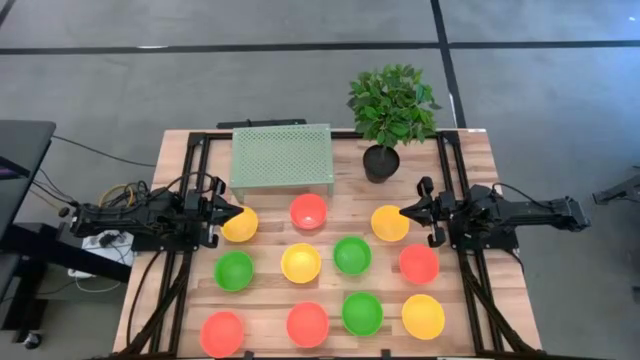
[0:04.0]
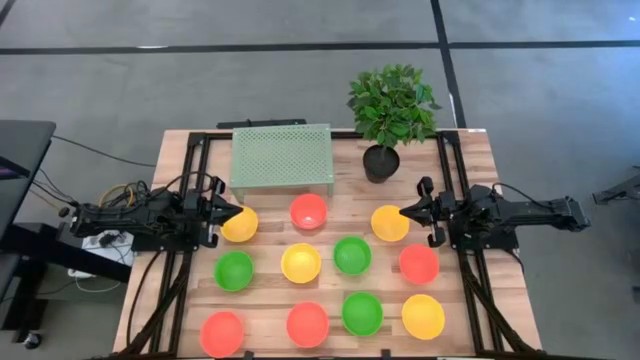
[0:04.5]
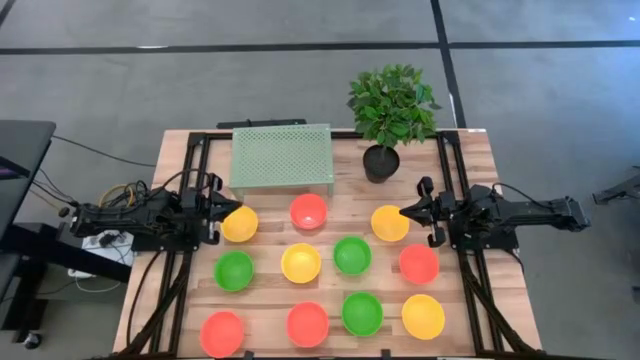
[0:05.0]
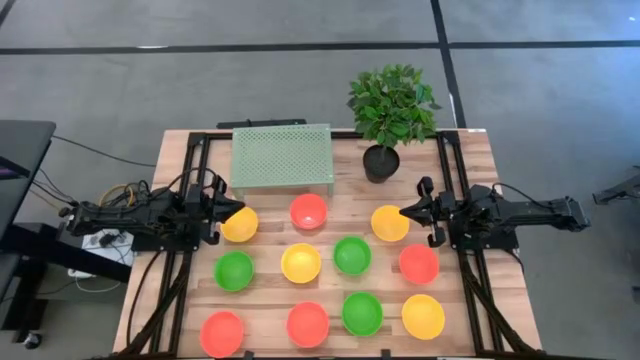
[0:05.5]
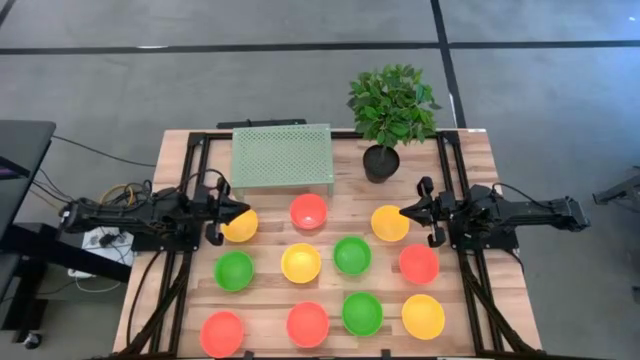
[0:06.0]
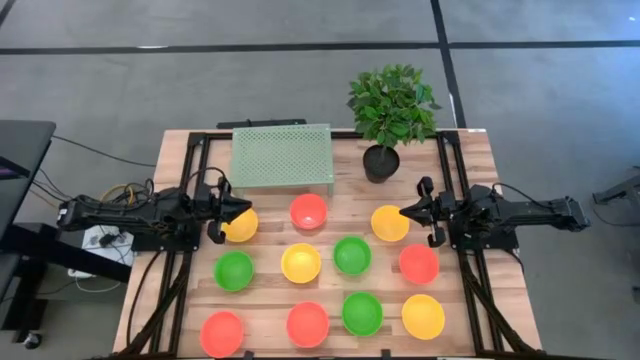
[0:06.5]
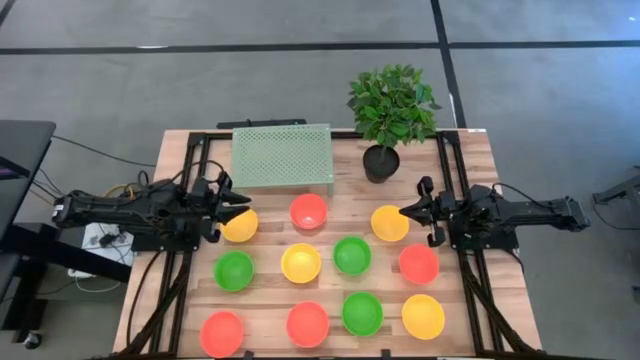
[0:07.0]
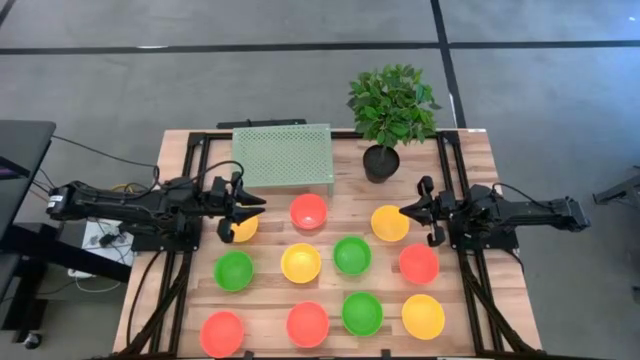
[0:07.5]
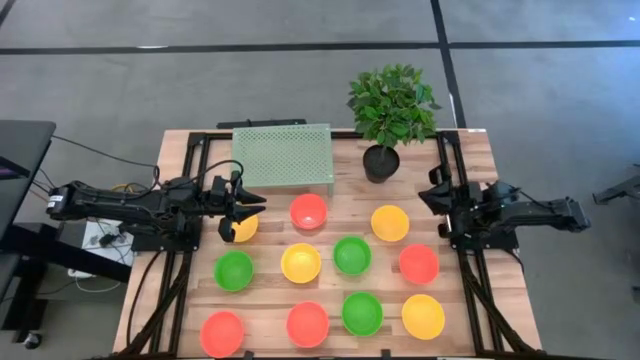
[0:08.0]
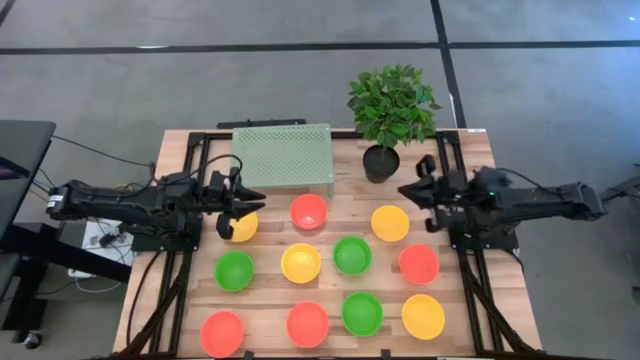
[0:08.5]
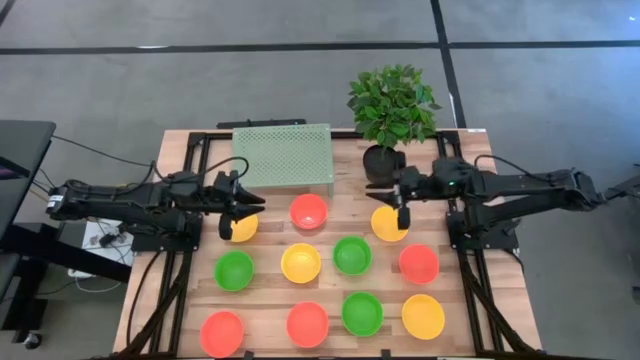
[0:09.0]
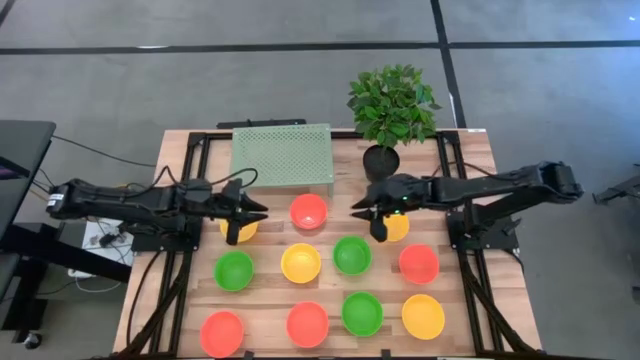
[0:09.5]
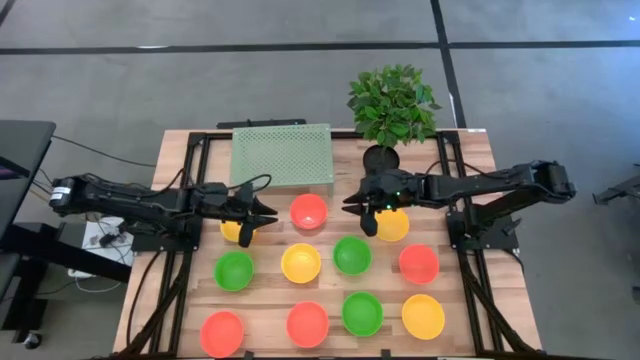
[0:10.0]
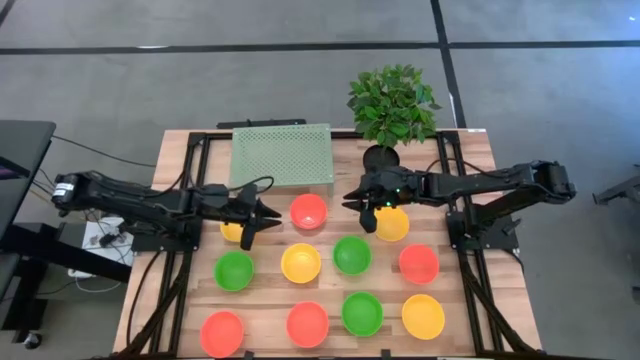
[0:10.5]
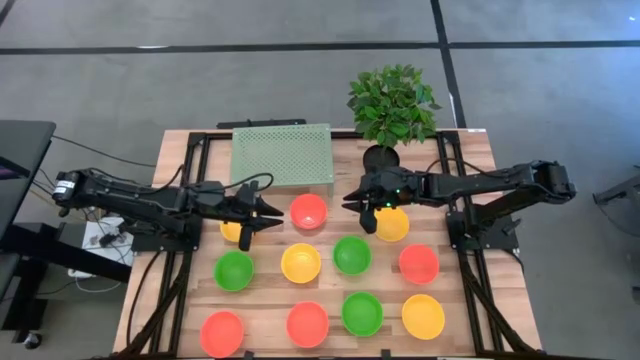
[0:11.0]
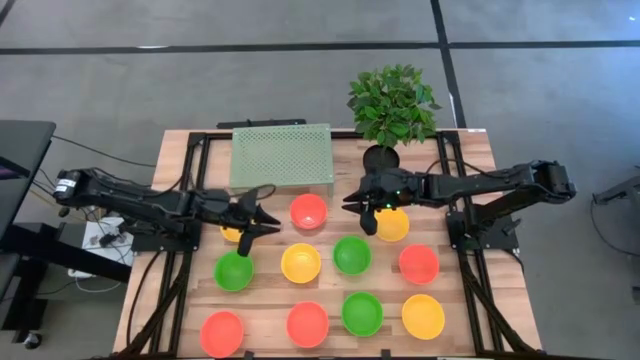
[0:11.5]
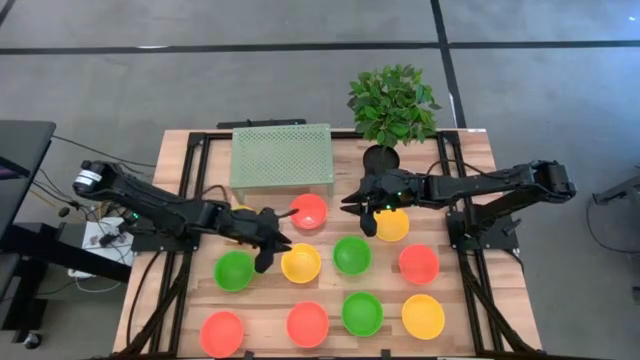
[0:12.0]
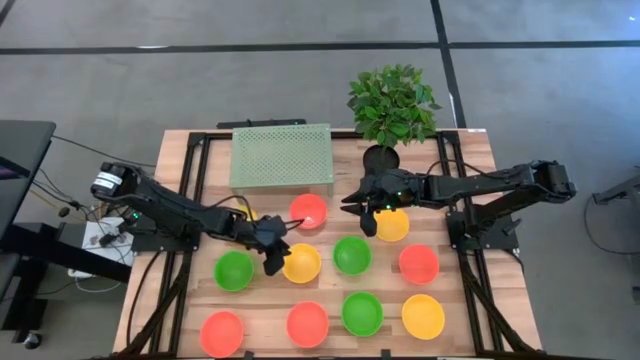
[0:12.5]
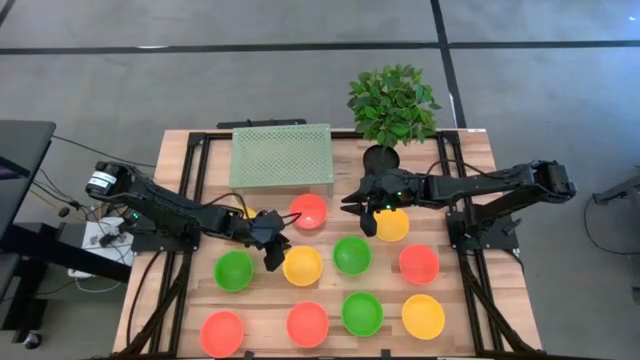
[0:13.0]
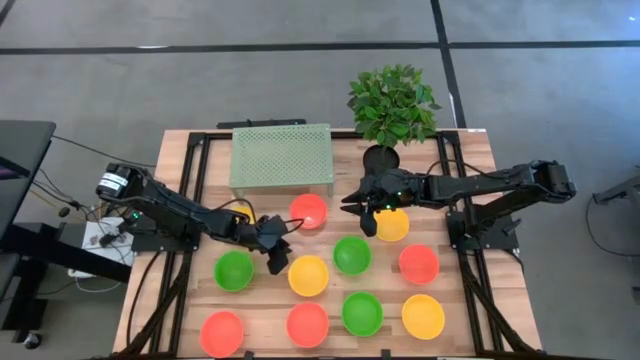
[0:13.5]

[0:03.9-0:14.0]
Task: Pick & Place Mini bowls
Put the yellow bowl on the shelf

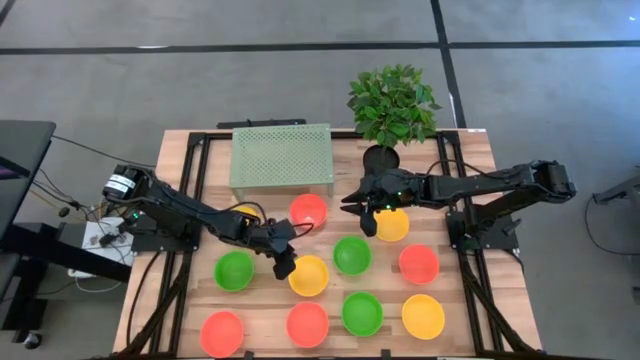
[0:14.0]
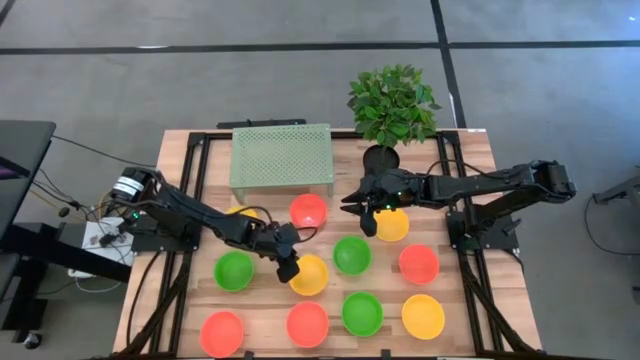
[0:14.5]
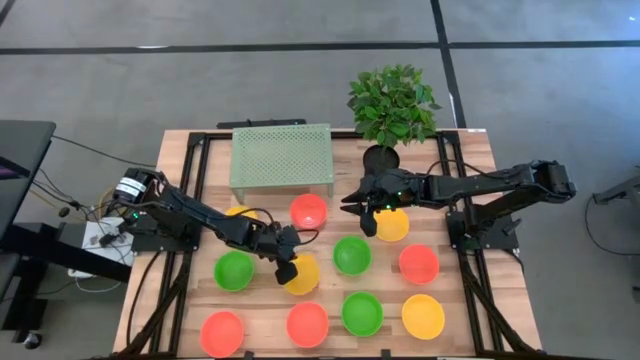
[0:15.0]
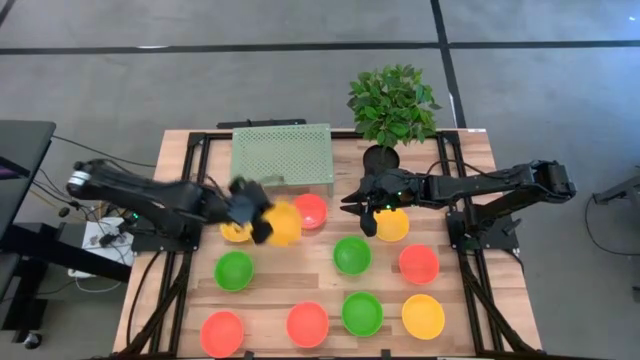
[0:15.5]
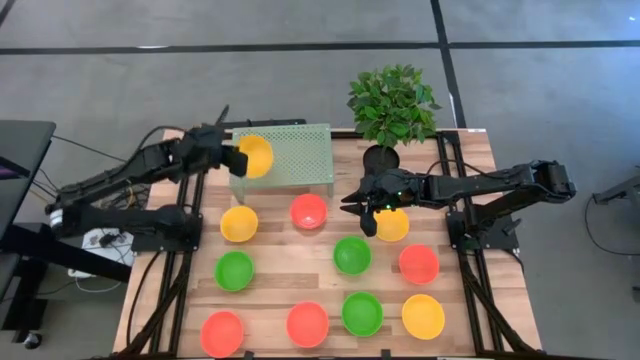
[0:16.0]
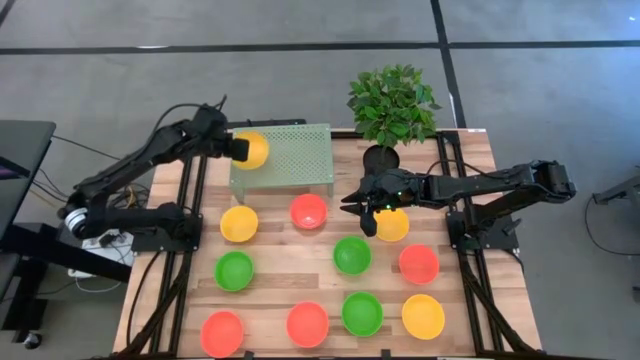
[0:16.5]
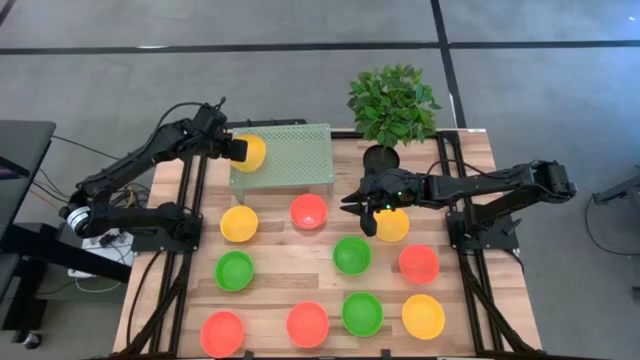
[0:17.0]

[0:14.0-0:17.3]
Put the yellow bowl on the shelf

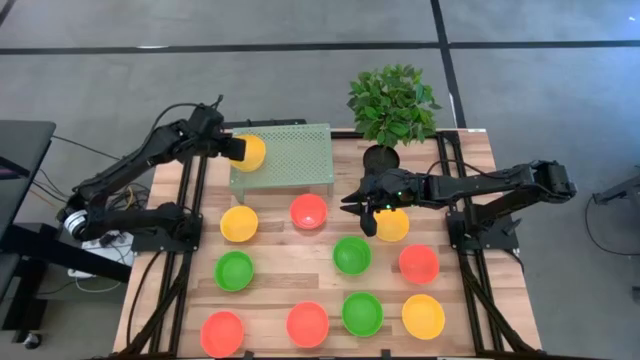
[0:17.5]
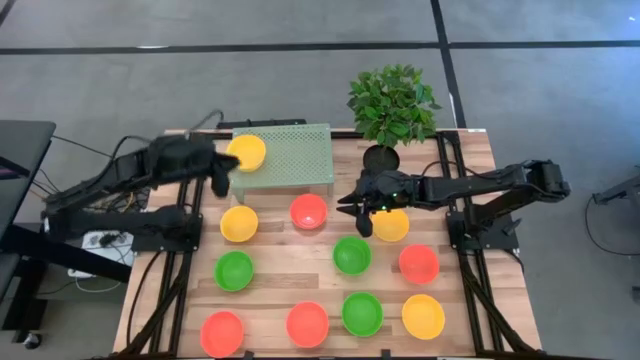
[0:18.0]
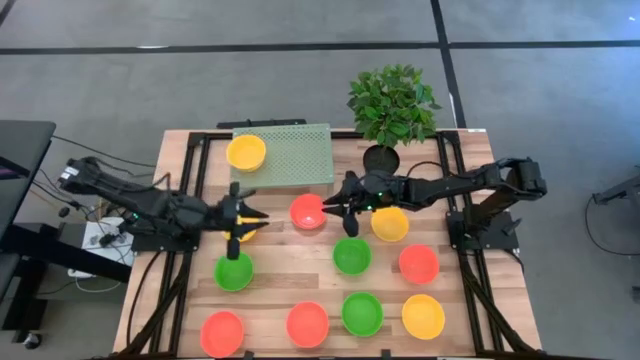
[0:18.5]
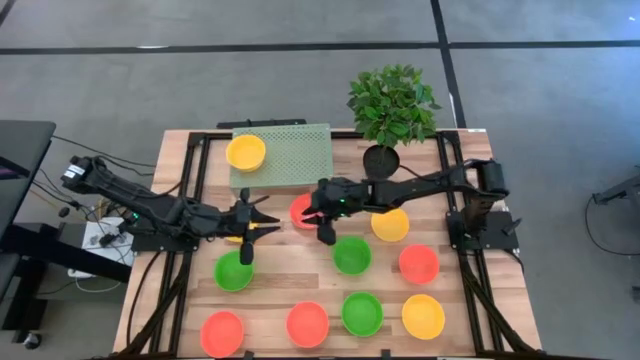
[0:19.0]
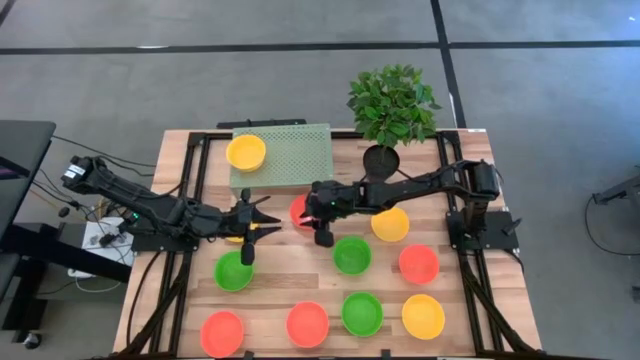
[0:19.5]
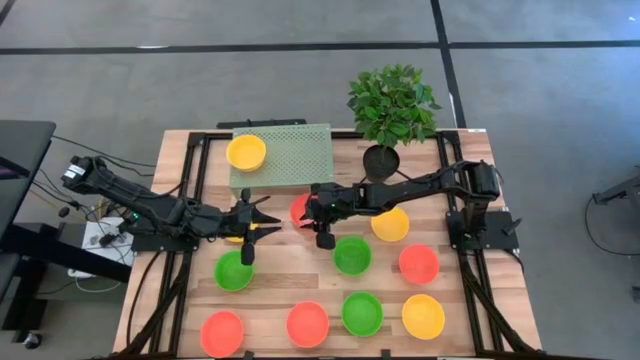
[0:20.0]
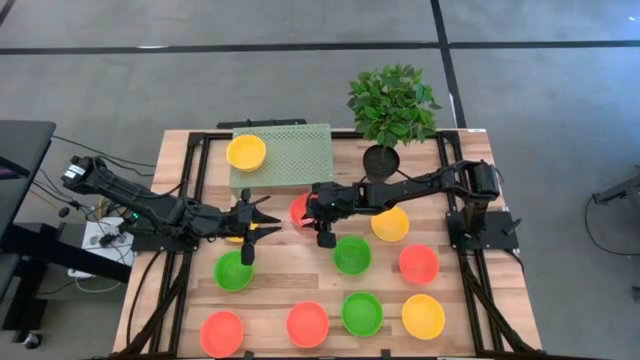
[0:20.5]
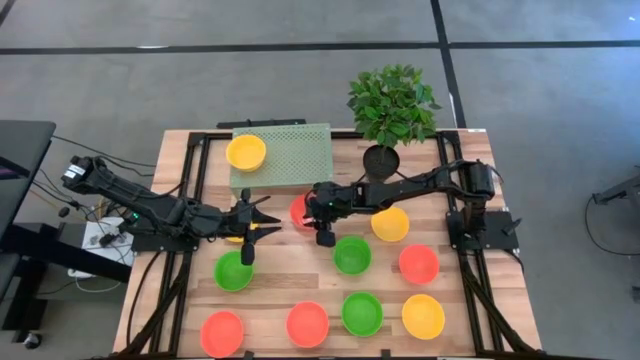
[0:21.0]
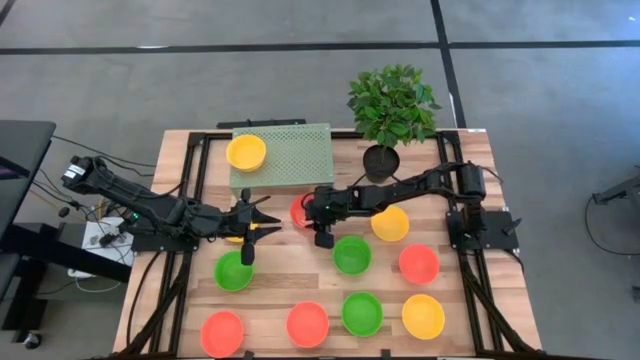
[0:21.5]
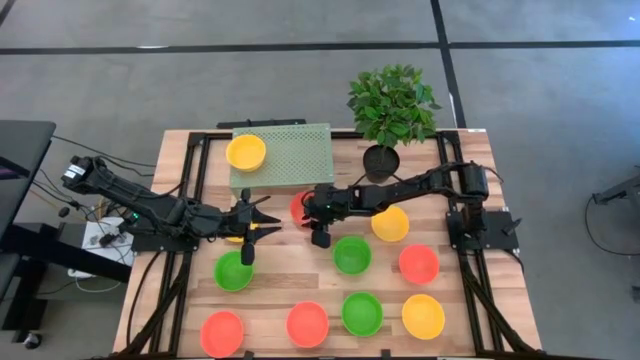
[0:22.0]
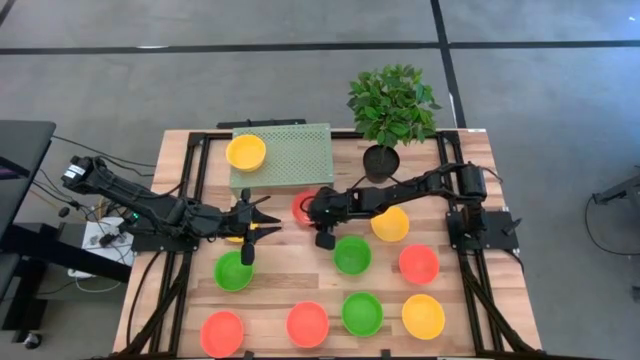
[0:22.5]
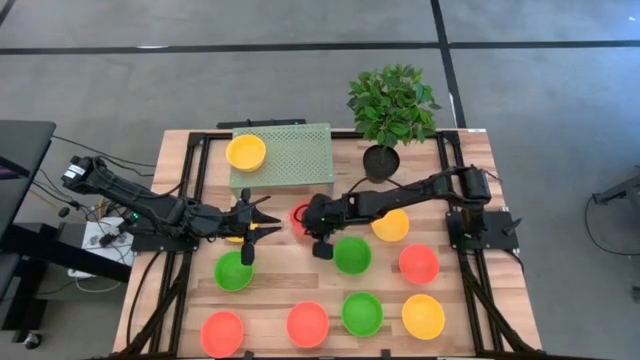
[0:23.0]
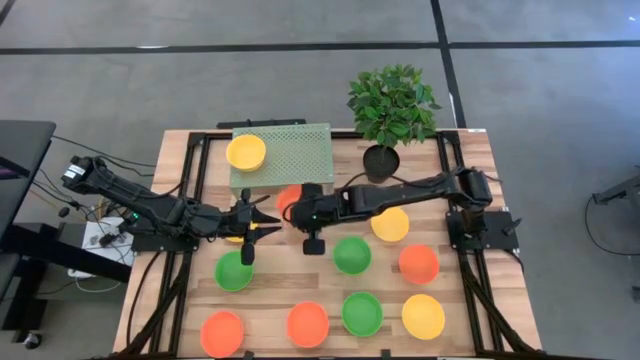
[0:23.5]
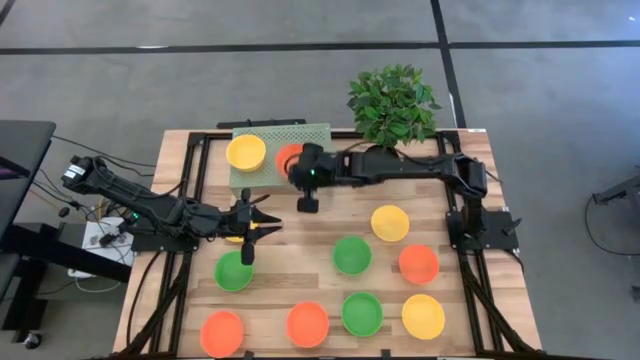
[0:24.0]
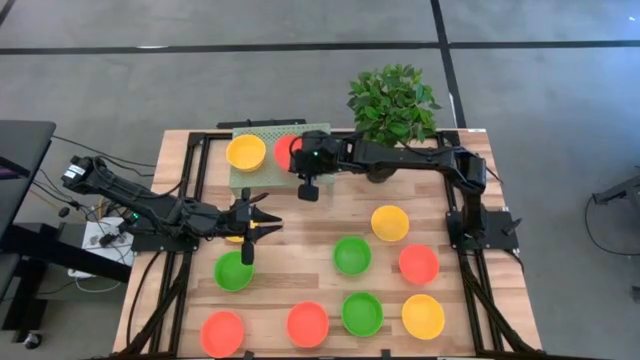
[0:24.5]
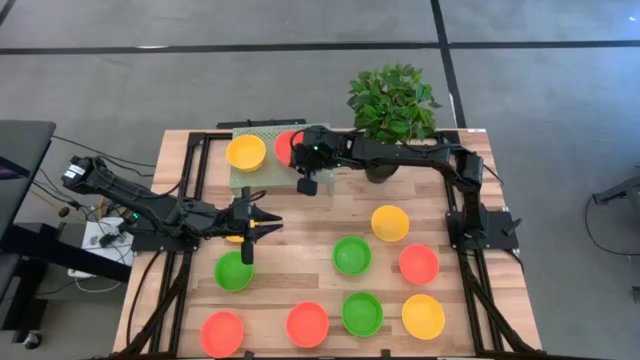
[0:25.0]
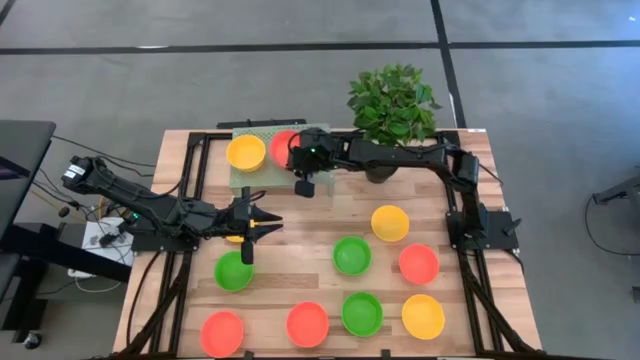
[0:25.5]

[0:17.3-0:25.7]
Put the orange bowl on the shelf
